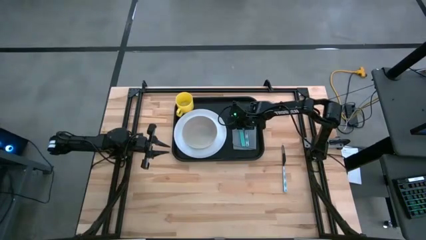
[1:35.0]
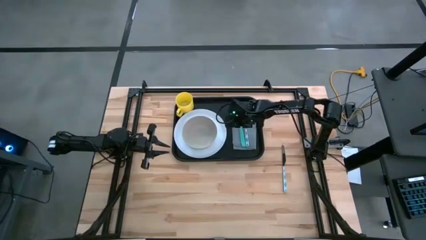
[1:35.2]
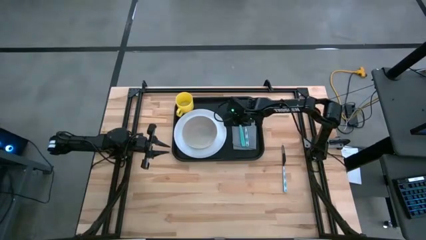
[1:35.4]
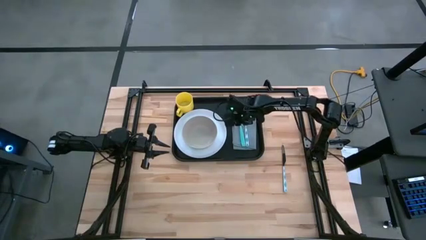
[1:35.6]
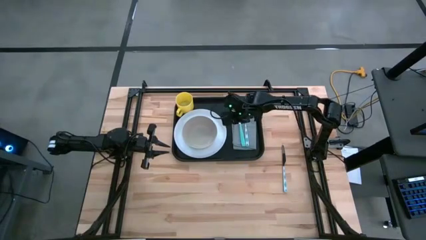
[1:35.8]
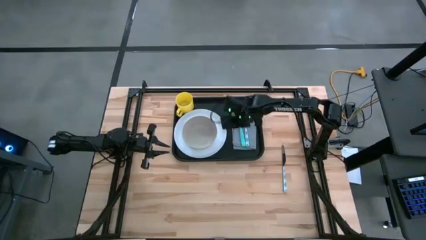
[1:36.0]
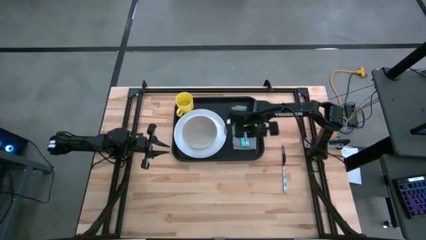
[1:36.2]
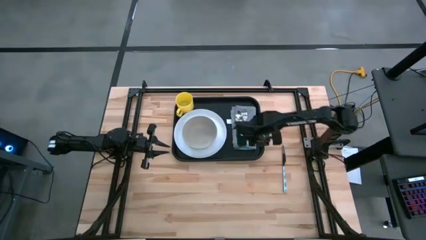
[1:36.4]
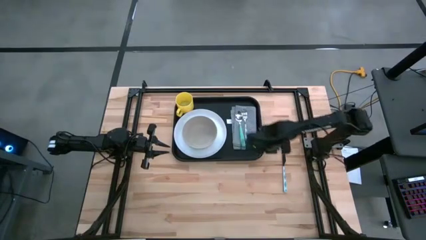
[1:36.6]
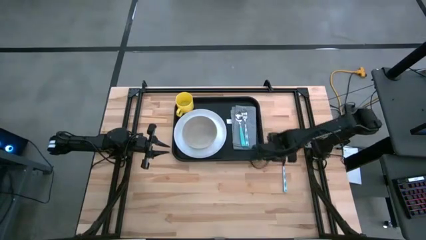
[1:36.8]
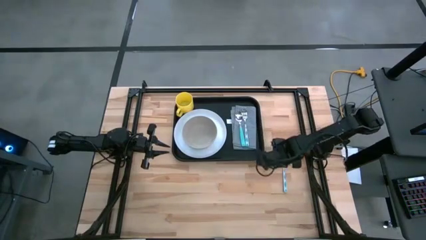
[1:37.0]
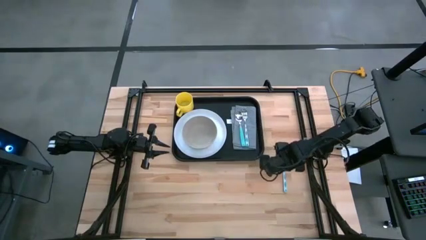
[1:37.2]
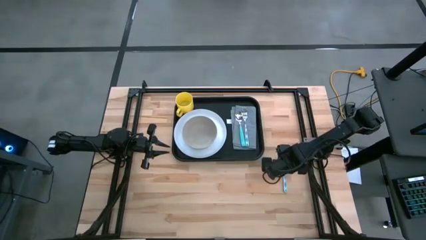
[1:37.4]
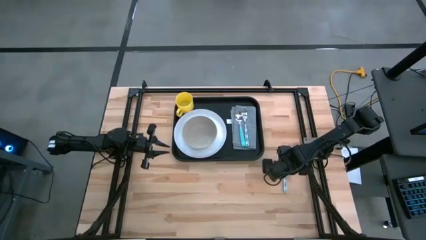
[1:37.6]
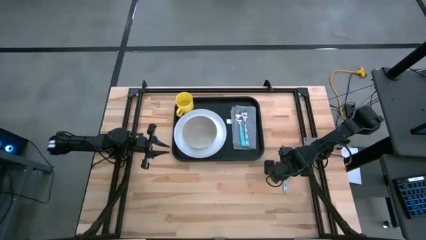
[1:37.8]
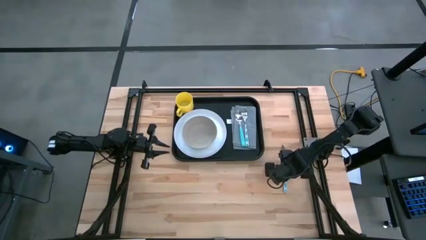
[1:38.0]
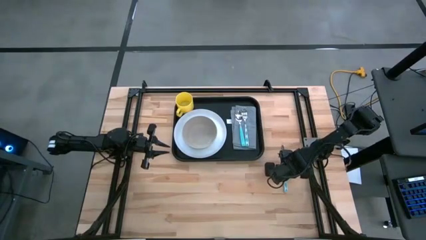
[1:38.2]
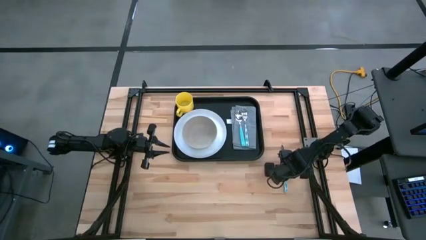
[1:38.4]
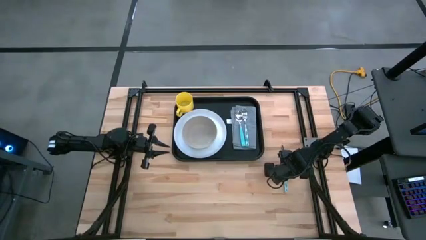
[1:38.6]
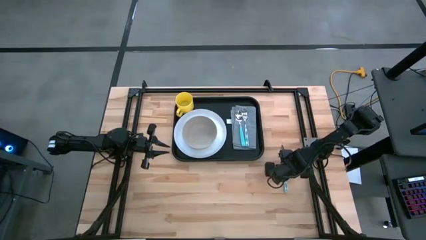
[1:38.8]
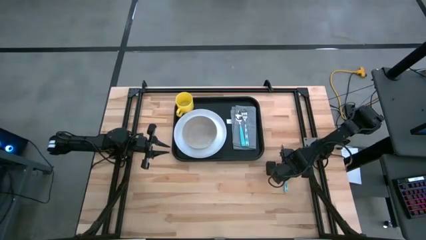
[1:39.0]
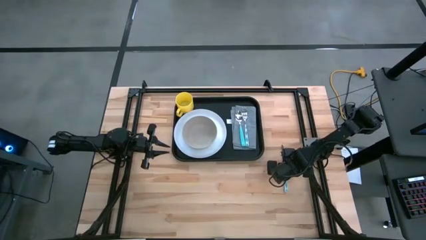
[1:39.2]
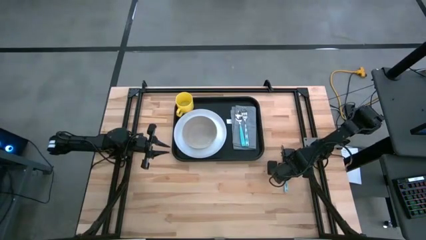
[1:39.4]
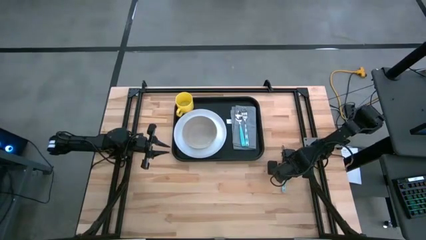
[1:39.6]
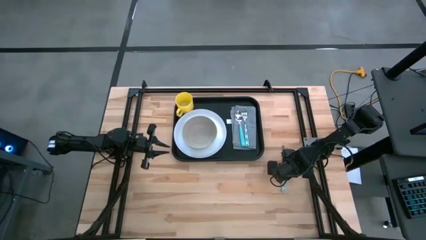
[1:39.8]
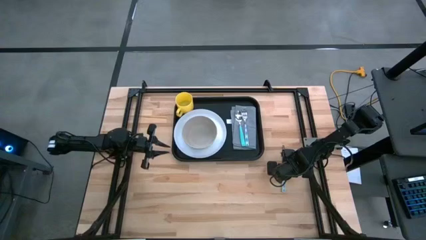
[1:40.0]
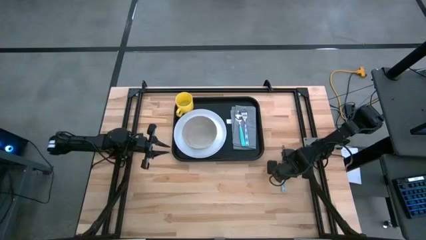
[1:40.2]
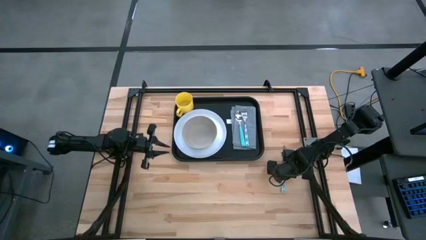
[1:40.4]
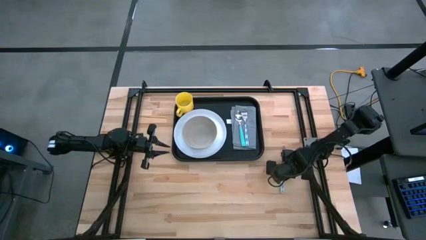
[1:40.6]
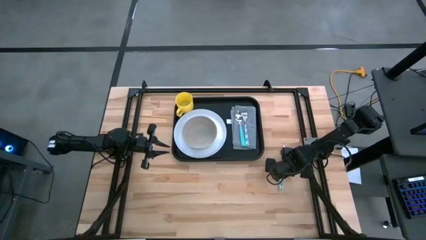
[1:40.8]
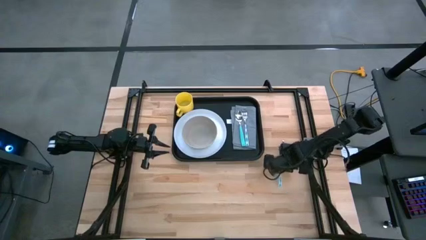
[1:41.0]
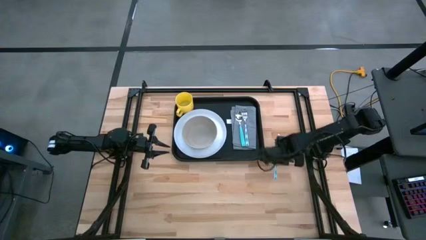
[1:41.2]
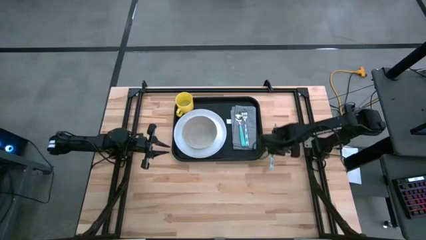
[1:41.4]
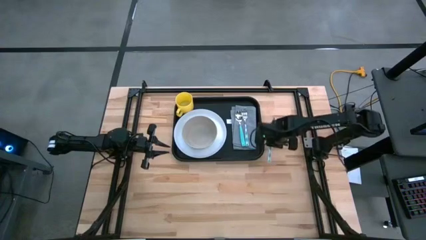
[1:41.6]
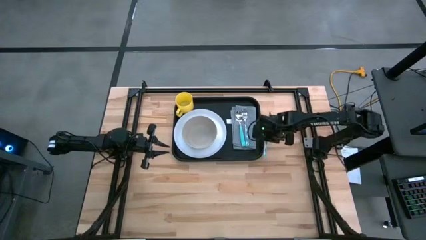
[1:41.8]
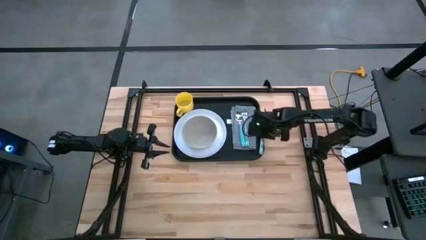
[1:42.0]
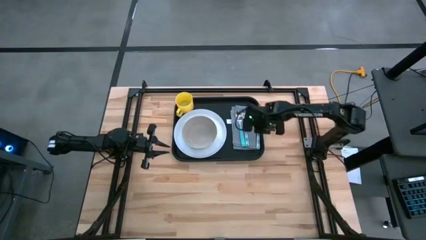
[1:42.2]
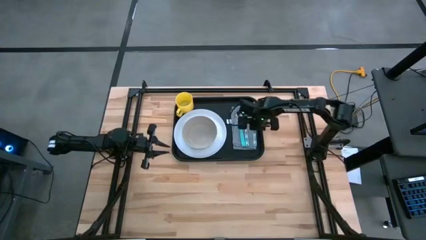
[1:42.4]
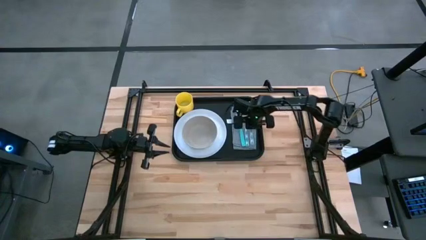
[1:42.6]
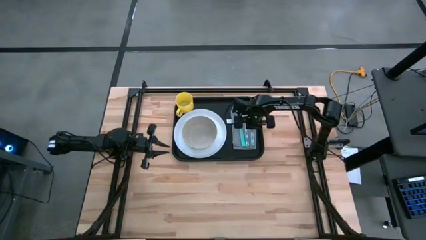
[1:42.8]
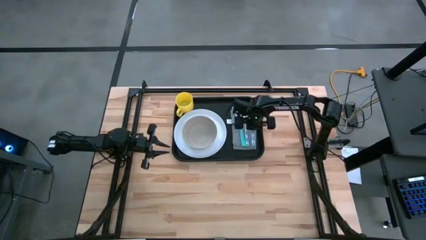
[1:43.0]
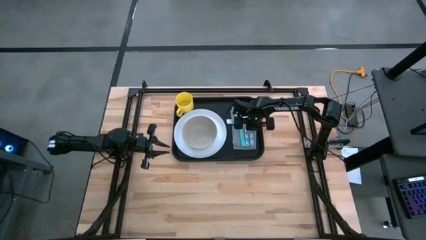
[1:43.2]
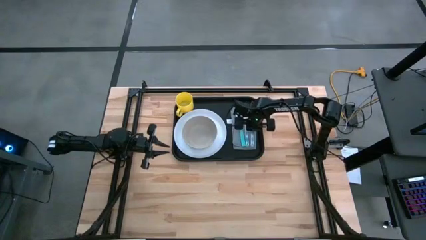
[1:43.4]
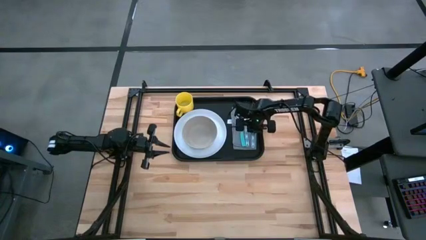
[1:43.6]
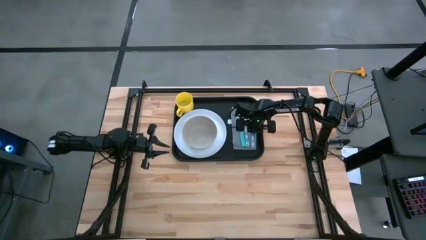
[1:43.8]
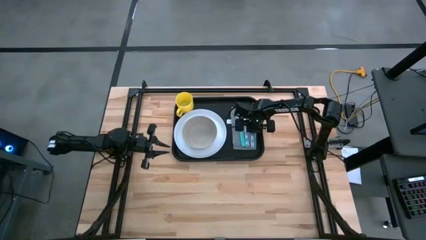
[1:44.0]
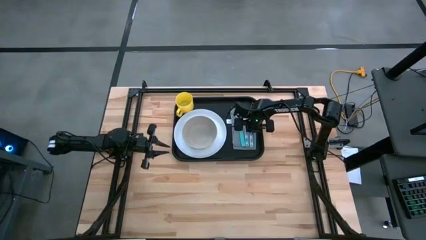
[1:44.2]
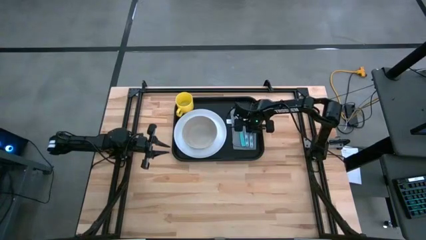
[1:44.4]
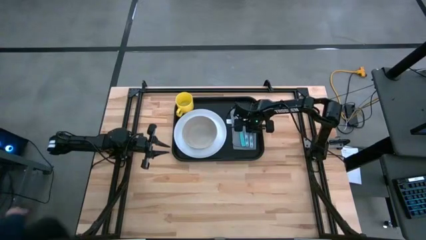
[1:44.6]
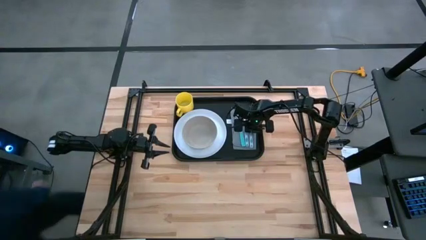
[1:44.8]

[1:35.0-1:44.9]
Task: Set up tray
Put the blue knife on the gray napkin to the right of the blue fork

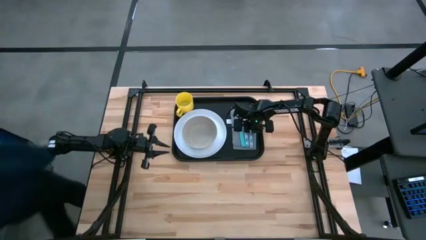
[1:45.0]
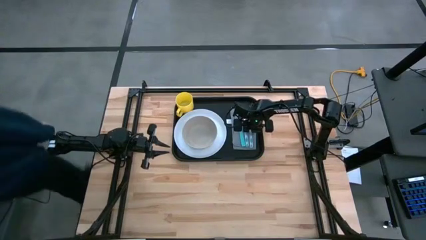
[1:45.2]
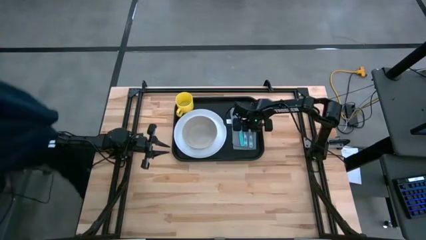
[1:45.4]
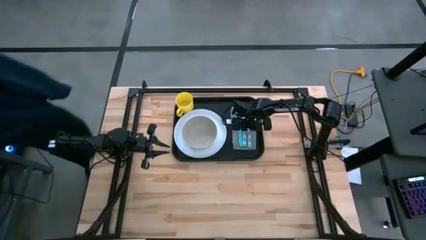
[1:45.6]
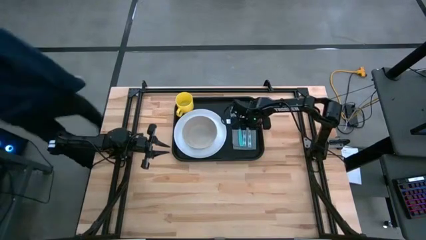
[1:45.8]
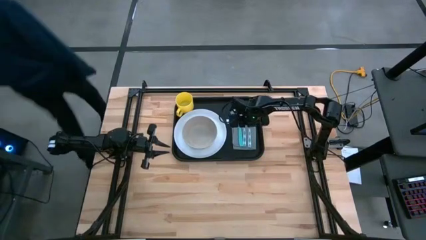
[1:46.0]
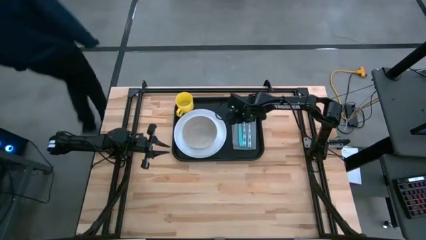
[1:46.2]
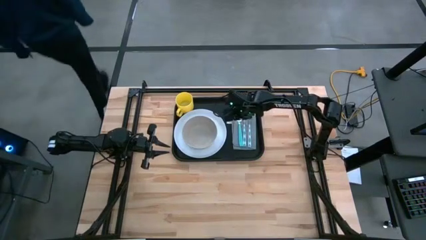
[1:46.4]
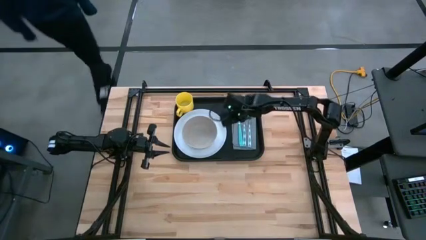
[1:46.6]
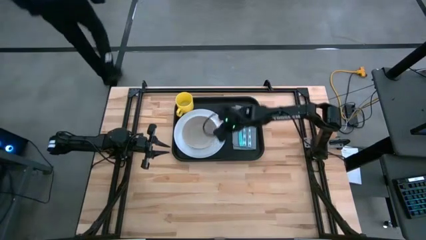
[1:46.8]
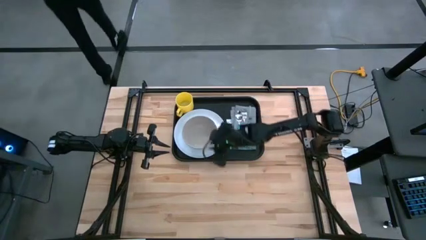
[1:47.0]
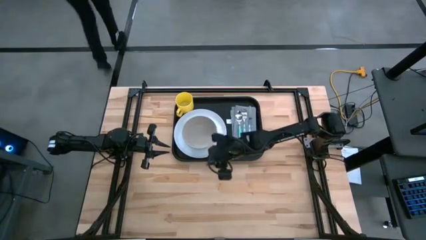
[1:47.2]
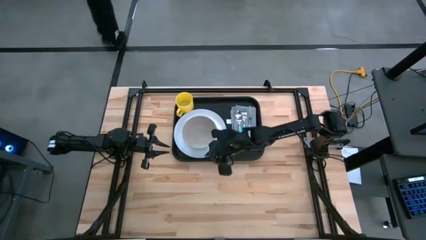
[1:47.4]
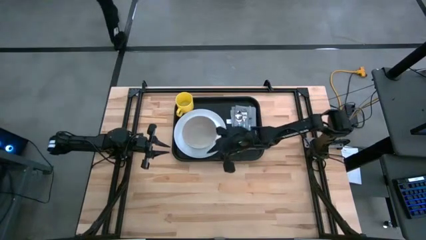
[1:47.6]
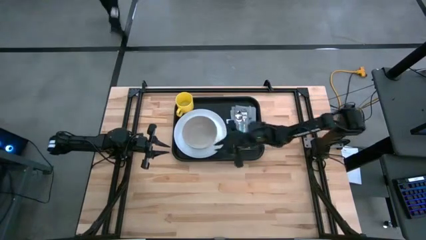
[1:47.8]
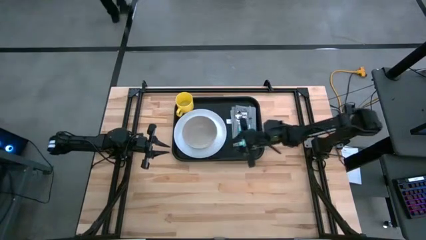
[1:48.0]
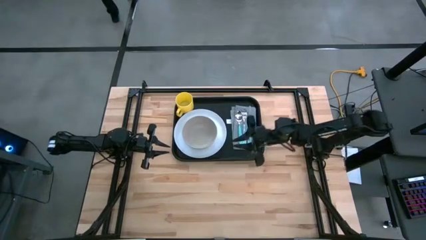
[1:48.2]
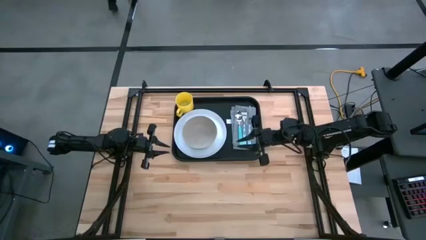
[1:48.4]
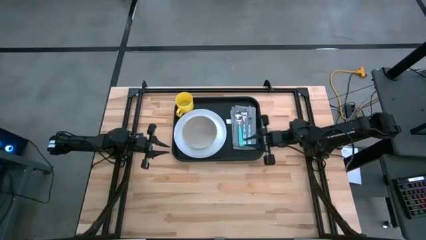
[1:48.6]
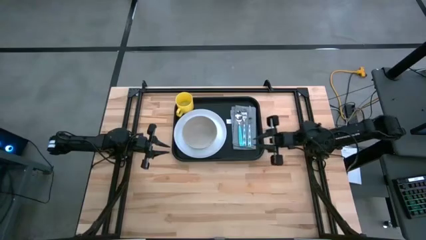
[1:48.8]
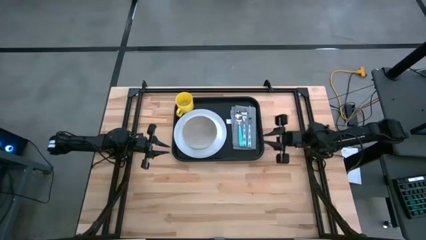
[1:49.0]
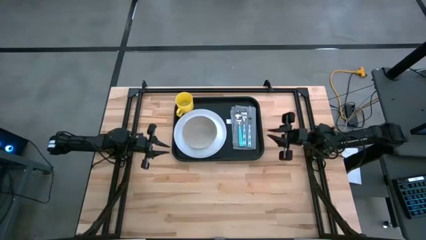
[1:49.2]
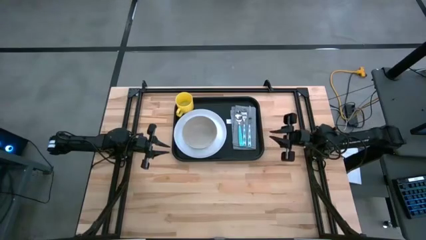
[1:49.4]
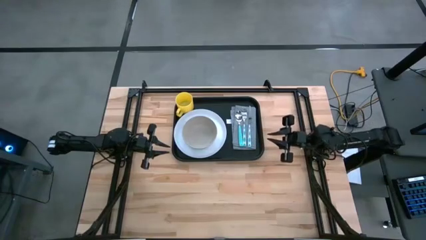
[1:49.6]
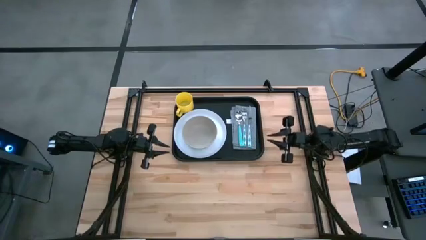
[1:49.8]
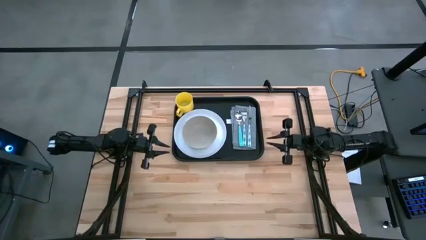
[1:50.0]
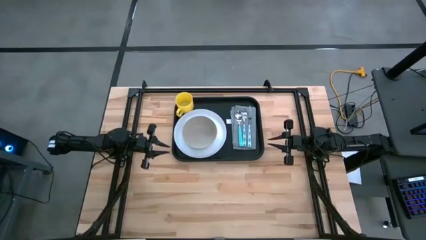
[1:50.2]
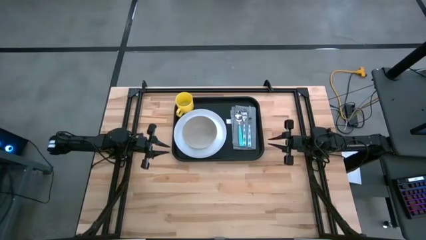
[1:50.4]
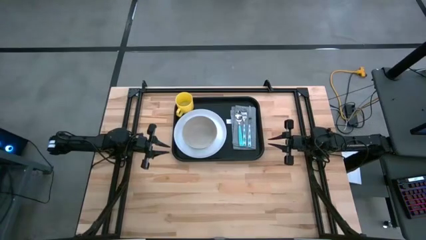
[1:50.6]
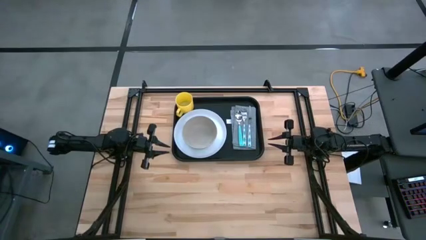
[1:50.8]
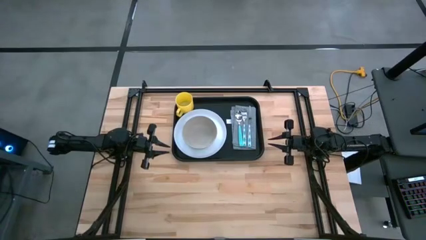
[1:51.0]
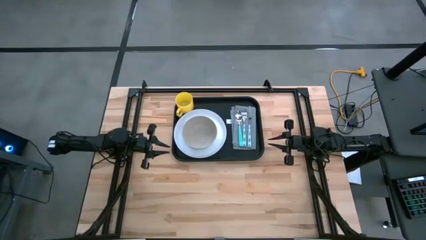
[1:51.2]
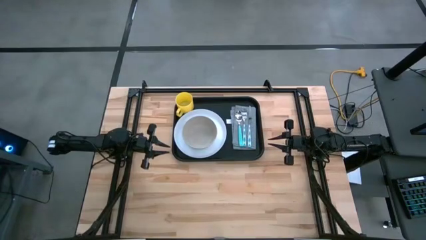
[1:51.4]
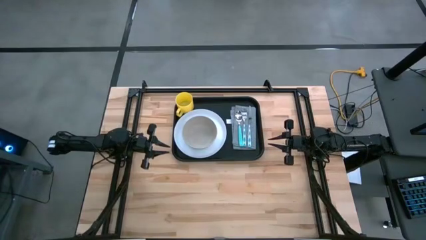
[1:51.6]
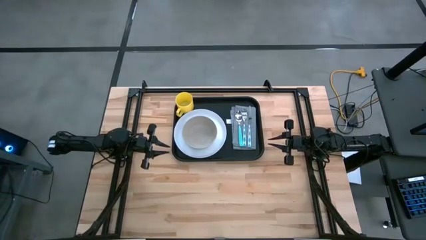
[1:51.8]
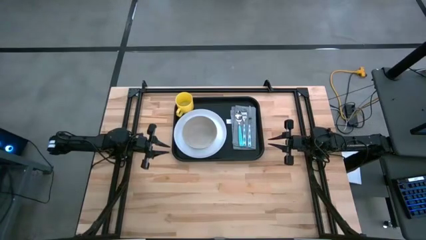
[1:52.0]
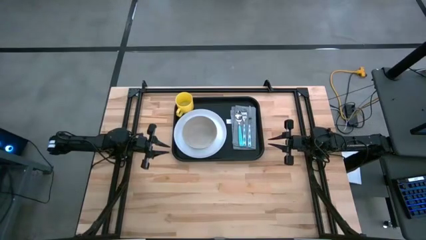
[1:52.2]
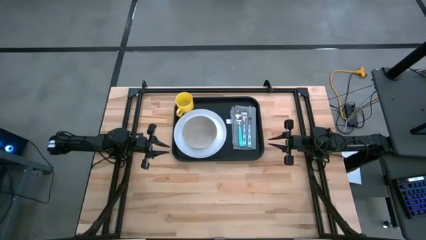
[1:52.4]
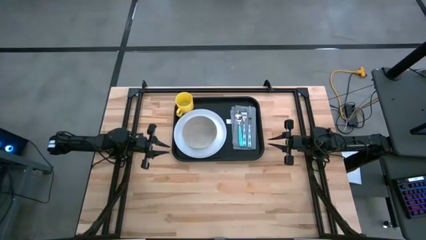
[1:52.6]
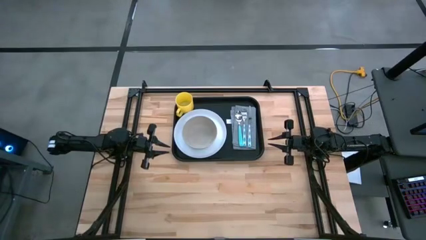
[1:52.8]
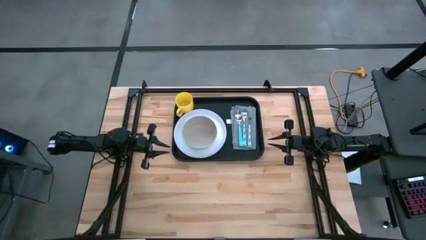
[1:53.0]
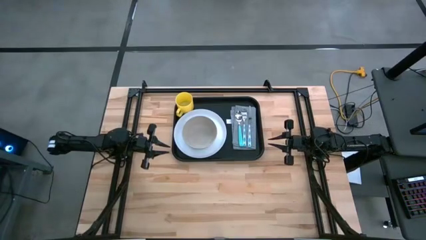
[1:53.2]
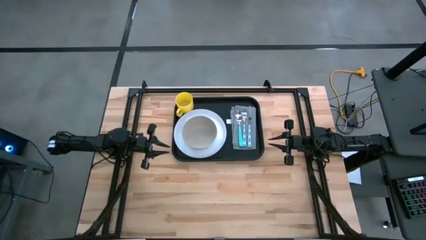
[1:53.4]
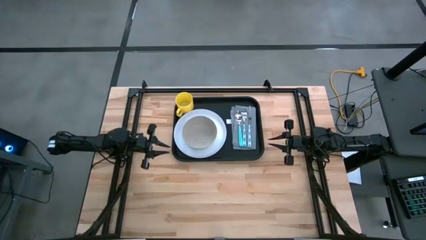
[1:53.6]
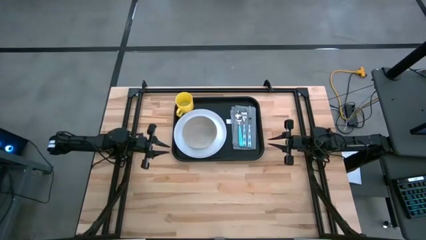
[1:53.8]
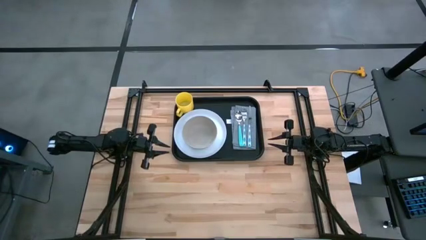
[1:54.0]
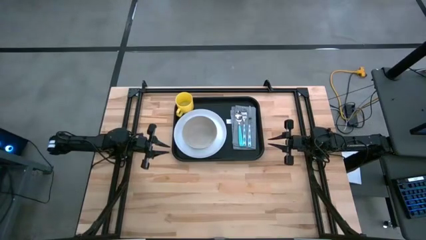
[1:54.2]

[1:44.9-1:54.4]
Return to Home Position
